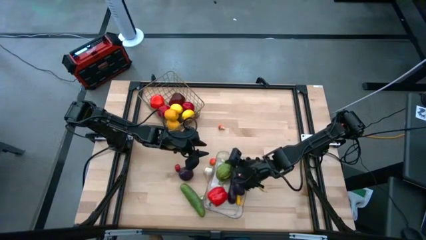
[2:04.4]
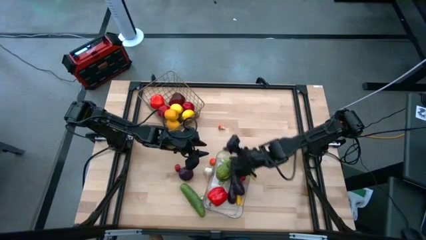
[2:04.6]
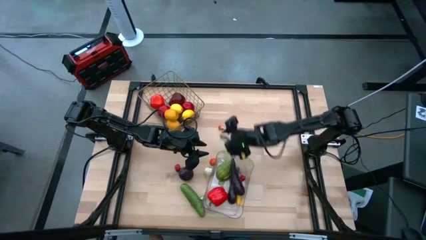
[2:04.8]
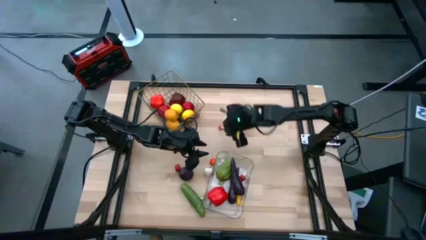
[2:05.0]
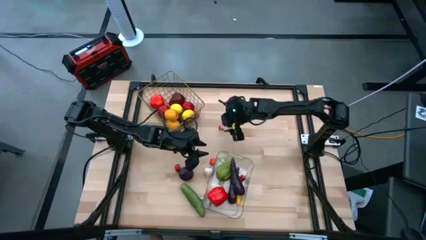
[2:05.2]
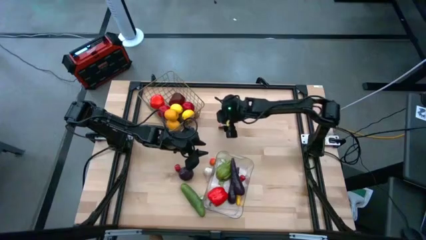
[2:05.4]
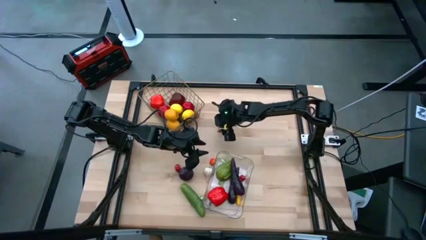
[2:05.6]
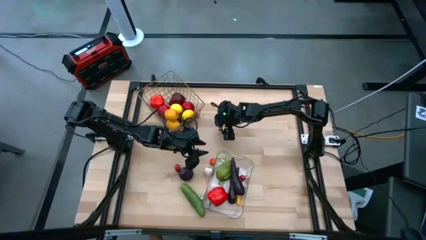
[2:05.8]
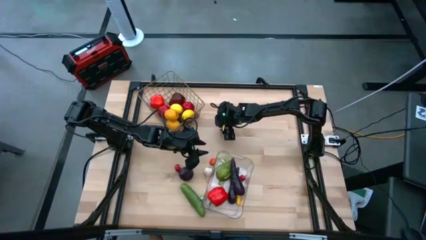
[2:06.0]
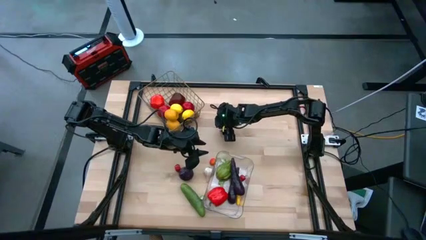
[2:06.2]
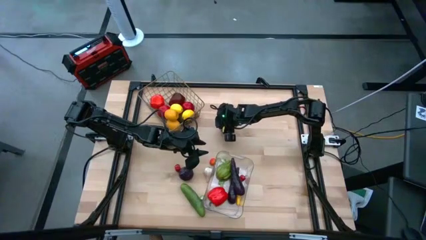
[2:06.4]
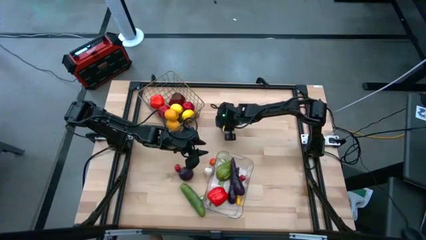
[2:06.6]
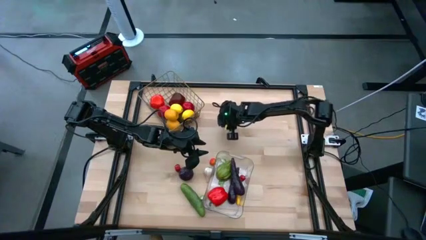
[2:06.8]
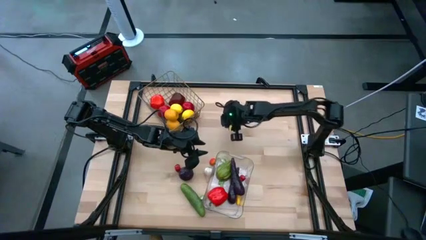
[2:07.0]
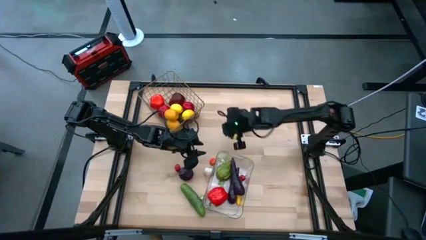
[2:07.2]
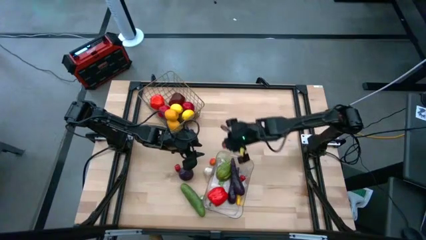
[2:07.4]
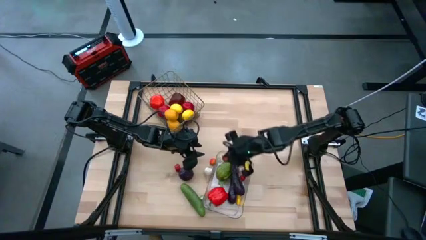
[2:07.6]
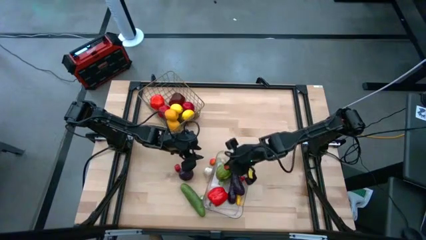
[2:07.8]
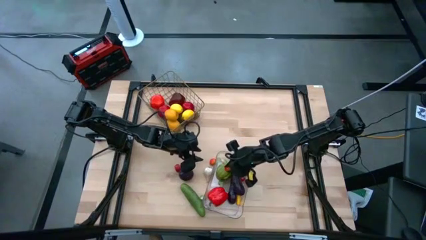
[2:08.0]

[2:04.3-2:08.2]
Task: Sort produce into baskets
Put the orange mushroom into the transparent bin

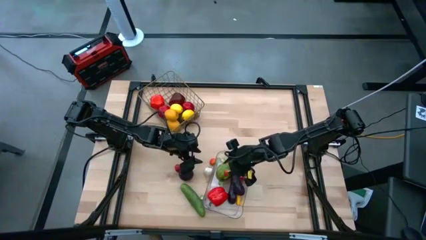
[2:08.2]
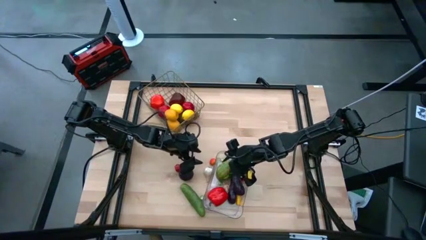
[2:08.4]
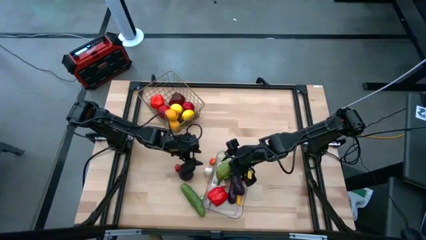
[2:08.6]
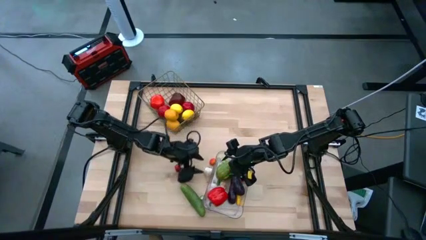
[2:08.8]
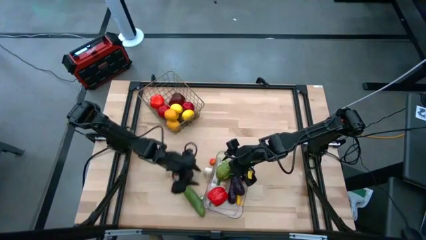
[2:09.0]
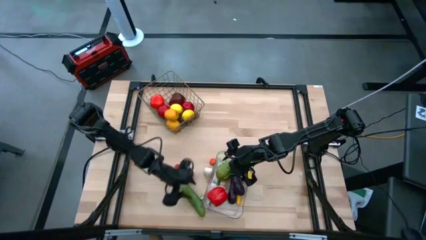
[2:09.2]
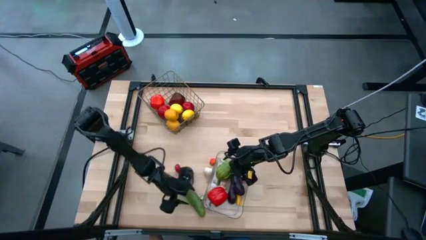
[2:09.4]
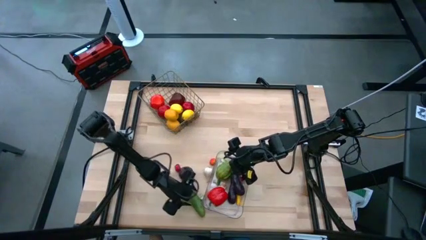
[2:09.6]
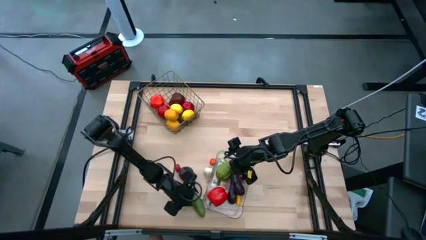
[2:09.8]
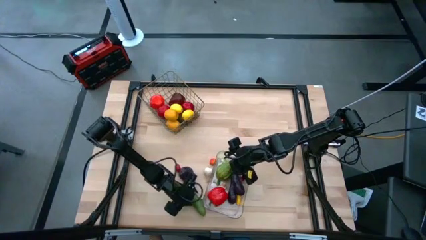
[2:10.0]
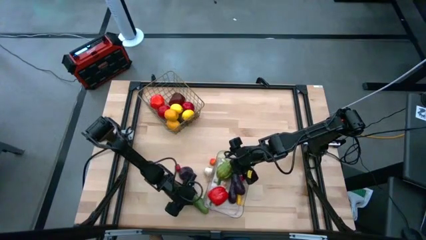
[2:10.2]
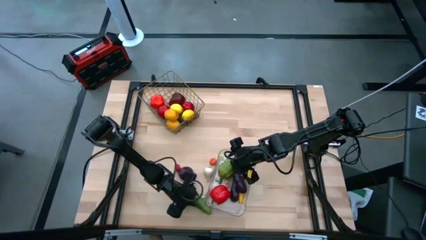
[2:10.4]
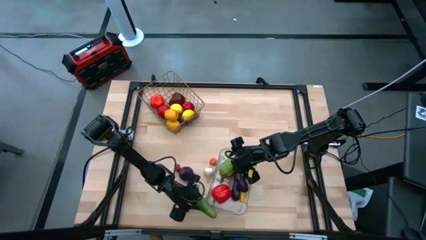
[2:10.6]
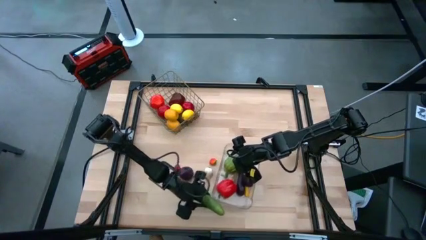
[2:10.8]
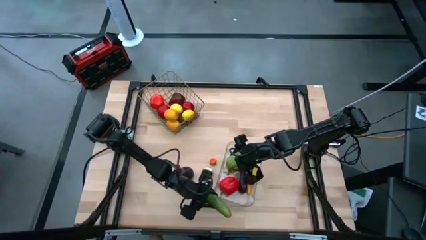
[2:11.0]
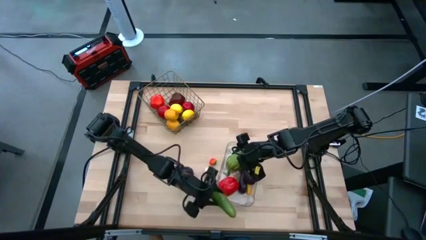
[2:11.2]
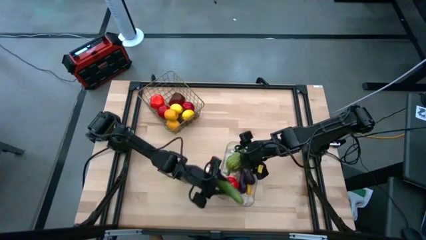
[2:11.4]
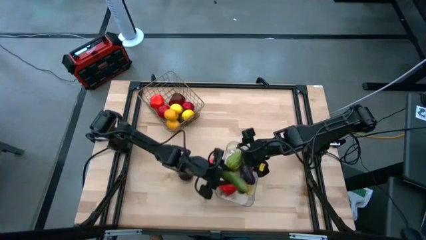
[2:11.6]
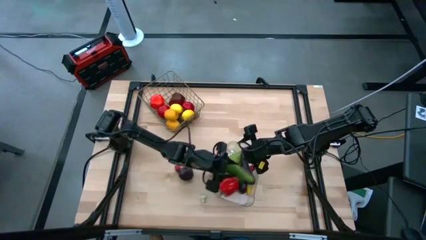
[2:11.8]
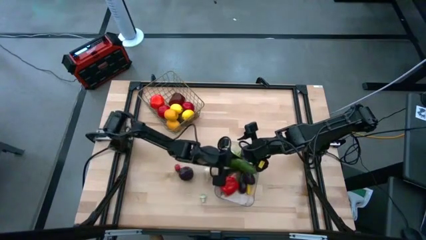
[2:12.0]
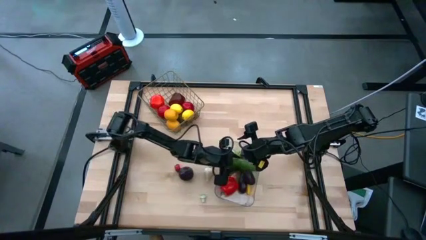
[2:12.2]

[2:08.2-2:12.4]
Put the green cucumber into the transparent bin

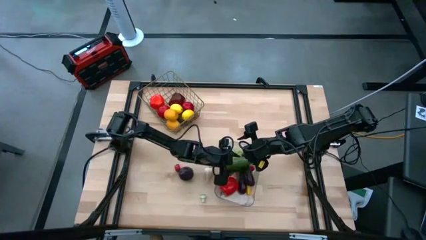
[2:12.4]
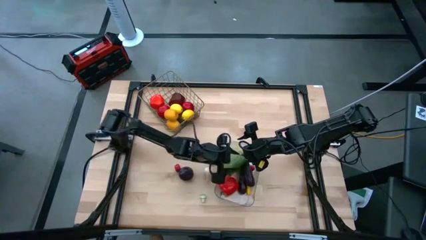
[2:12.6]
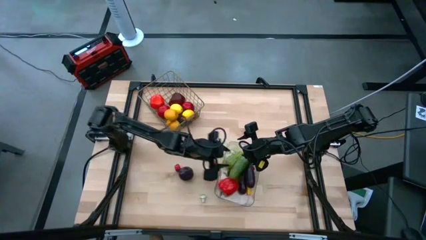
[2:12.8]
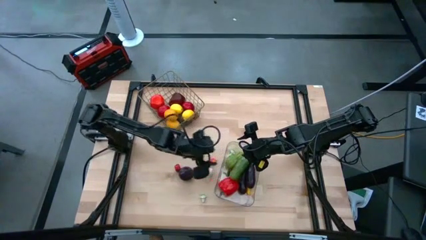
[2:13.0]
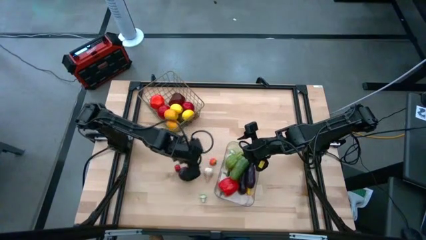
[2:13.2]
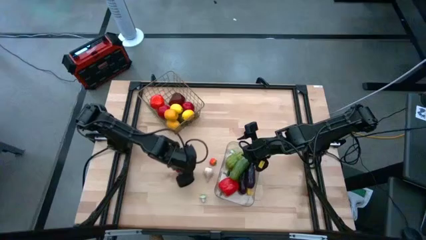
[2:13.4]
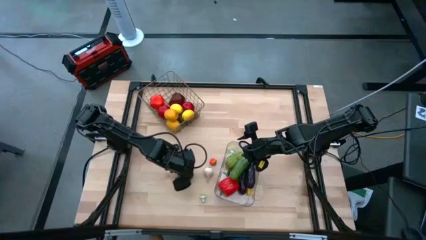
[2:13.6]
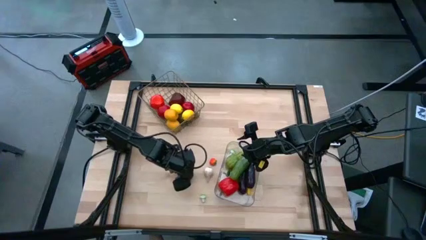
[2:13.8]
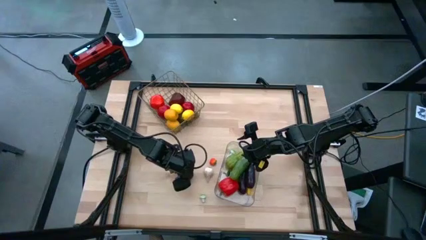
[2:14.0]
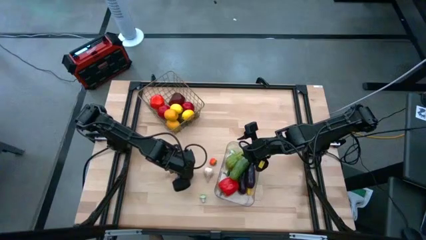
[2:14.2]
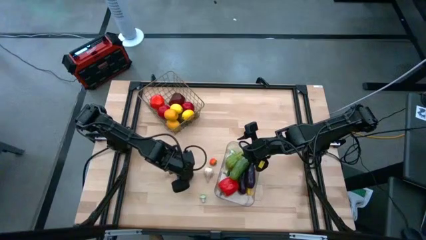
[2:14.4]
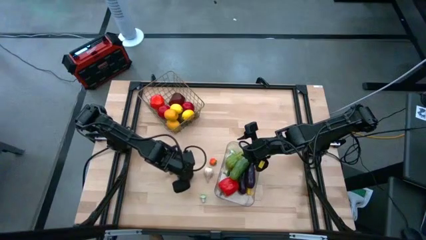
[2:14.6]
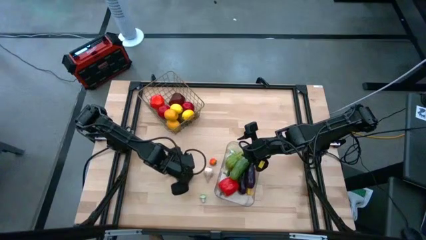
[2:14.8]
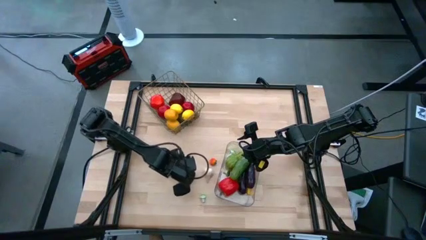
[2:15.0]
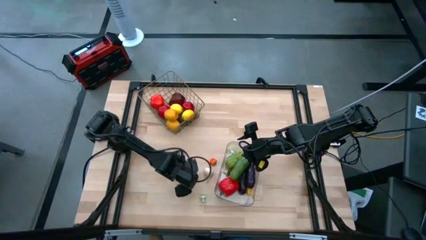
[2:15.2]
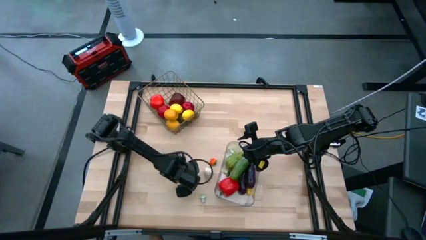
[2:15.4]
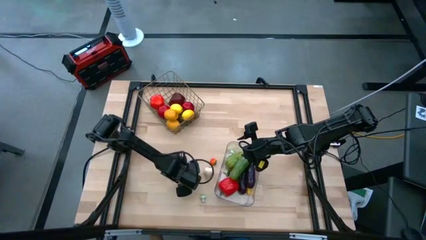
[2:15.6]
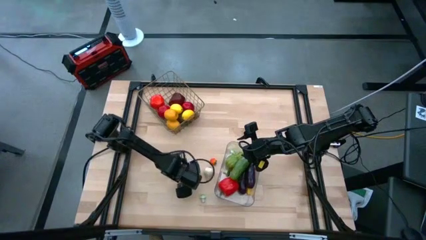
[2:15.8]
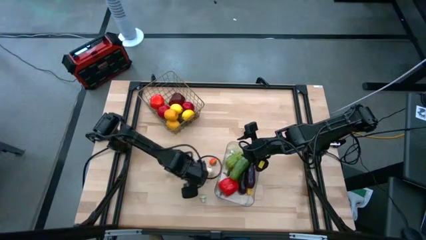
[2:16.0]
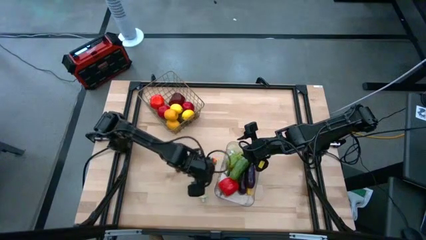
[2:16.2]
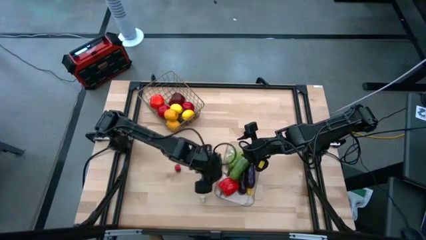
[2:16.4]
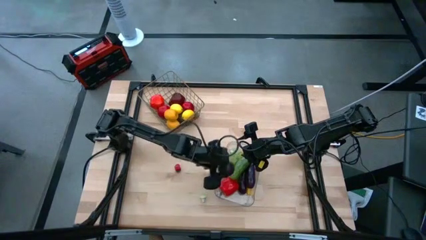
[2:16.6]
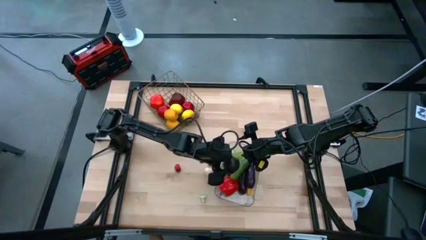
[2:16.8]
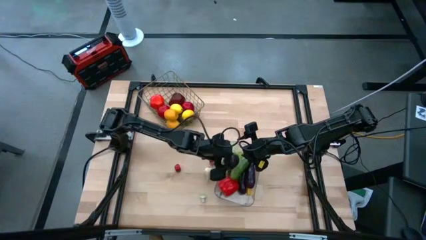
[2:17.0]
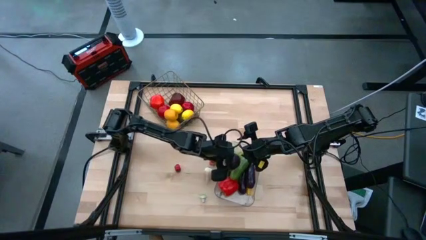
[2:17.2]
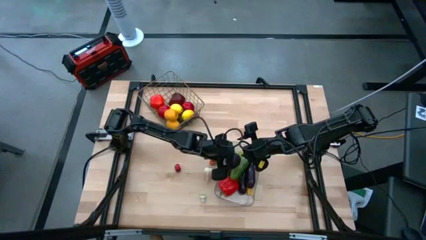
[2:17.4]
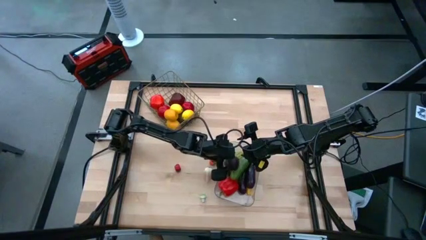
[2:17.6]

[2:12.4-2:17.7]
Put the purple onion into the transparent bin

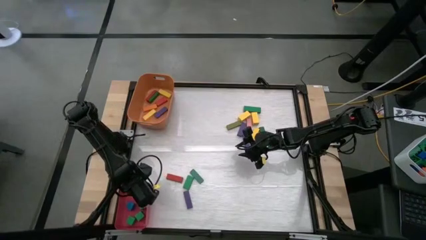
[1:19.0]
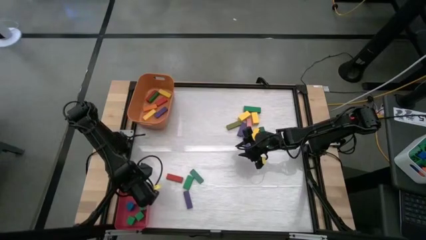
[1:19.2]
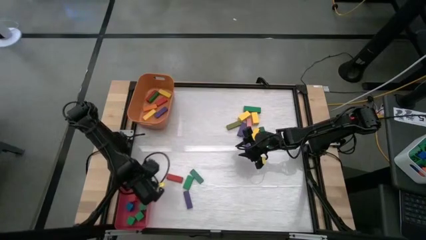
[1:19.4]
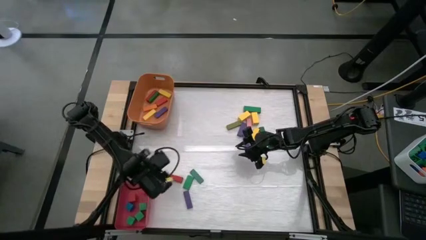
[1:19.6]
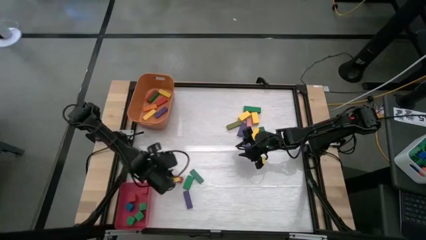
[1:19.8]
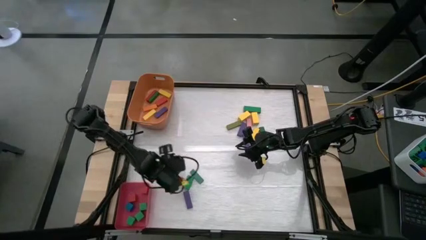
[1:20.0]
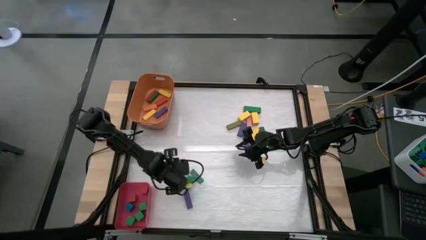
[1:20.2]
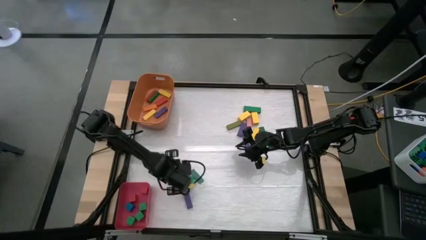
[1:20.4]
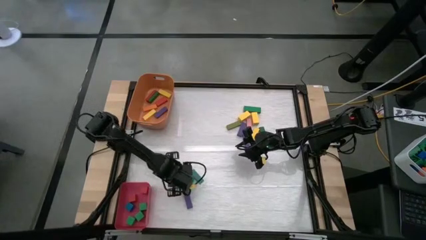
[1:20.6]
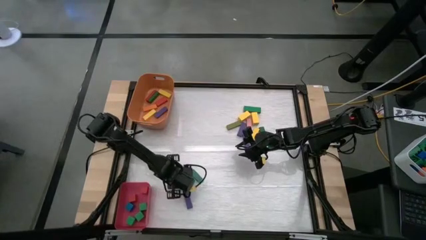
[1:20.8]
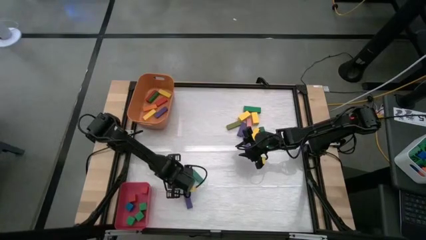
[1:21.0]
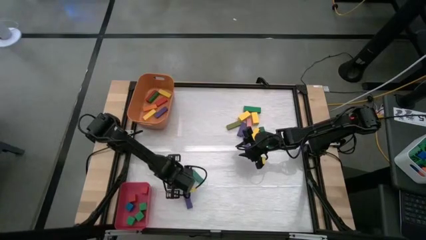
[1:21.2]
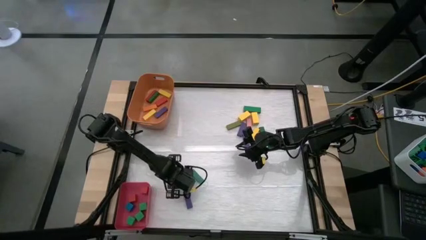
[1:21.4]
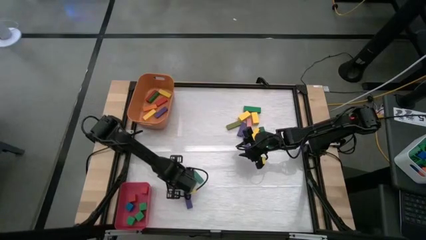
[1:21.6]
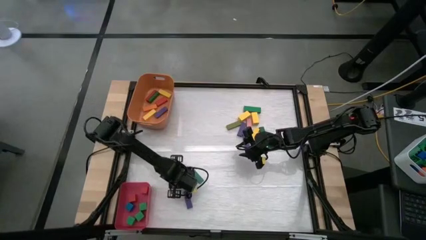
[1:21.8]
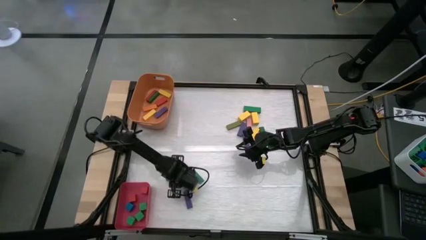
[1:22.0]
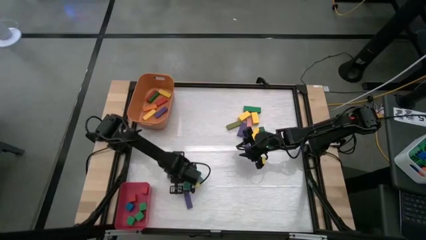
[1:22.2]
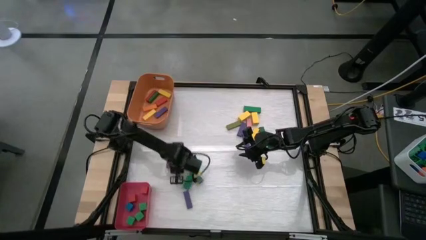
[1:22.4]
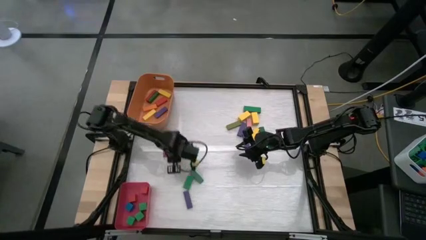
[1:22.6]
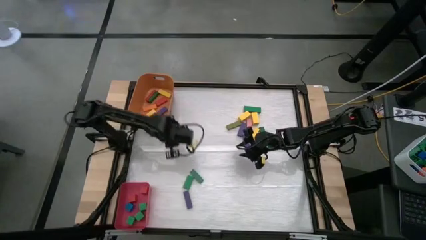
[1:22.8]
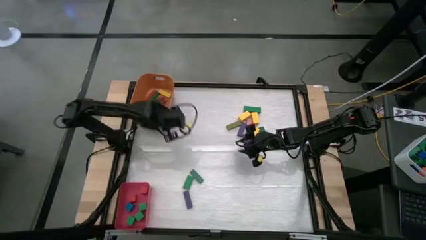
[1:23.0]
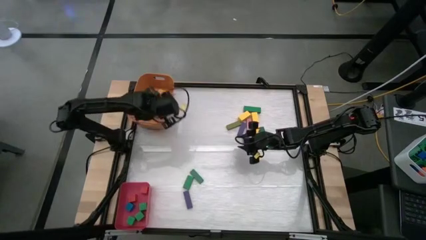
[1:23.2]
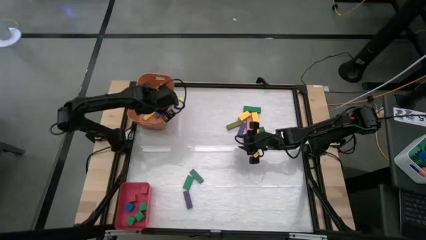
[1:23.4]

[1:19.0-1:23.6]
Task: Sort blocks by size
Put the big red block into the orange bin
